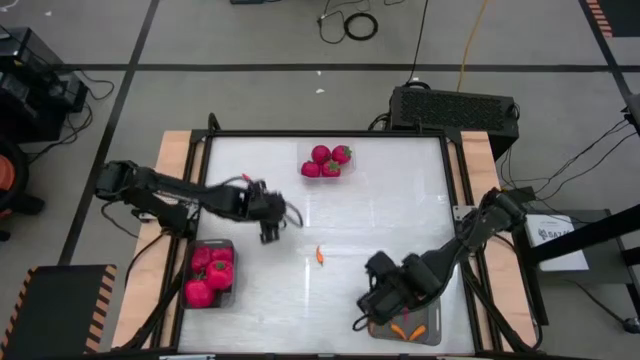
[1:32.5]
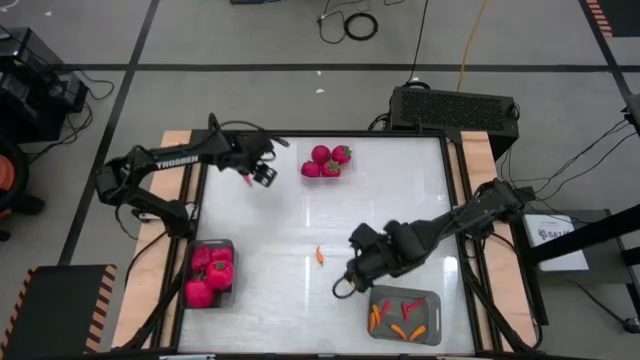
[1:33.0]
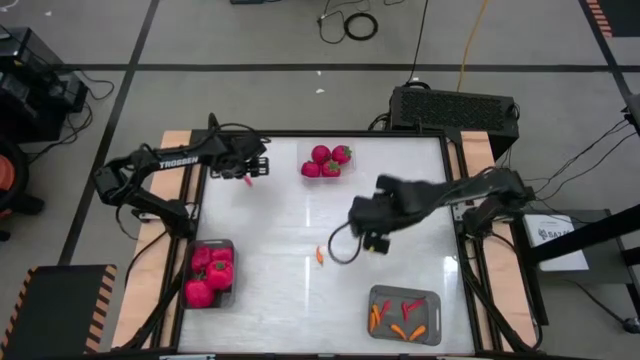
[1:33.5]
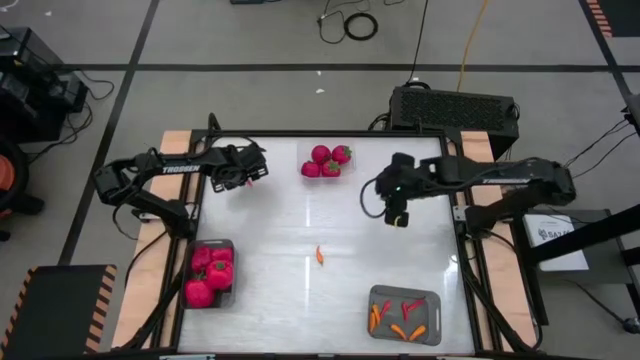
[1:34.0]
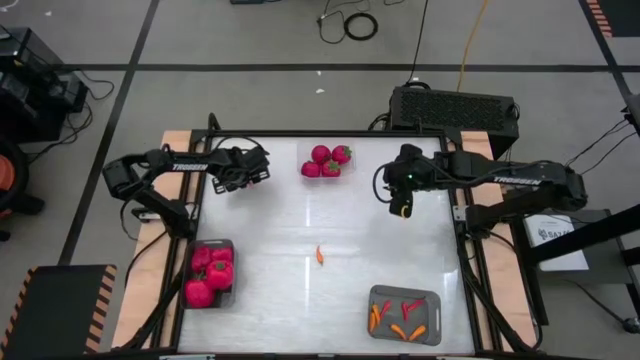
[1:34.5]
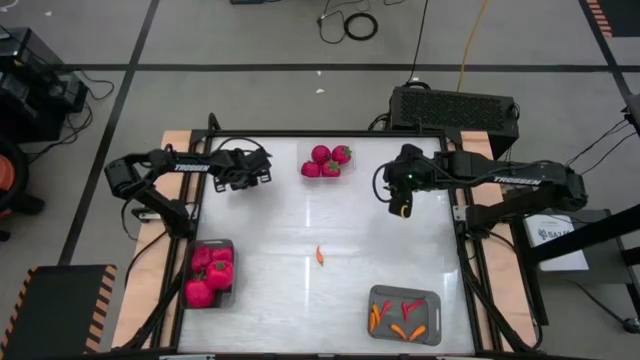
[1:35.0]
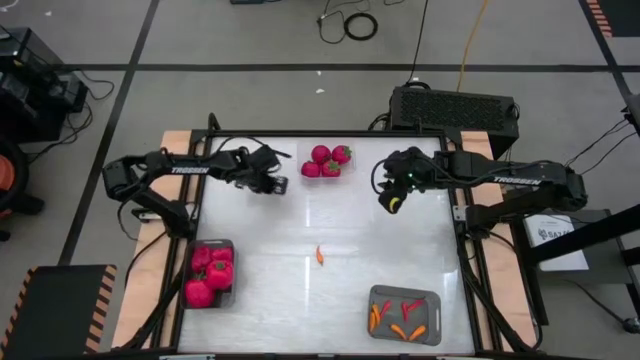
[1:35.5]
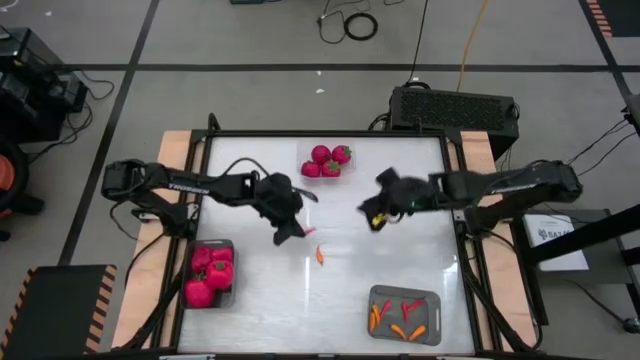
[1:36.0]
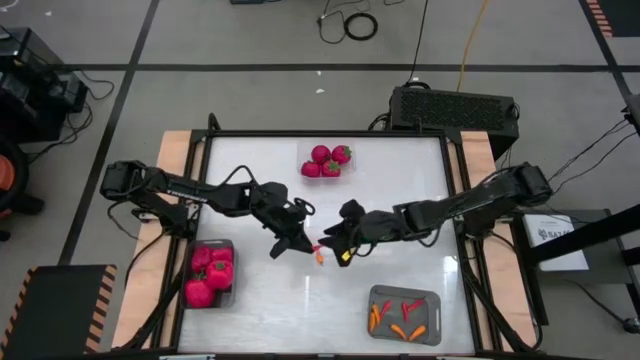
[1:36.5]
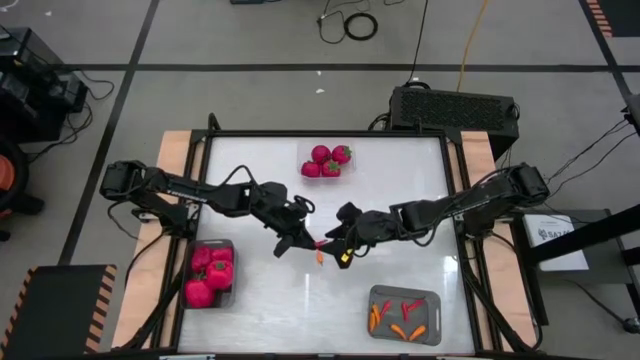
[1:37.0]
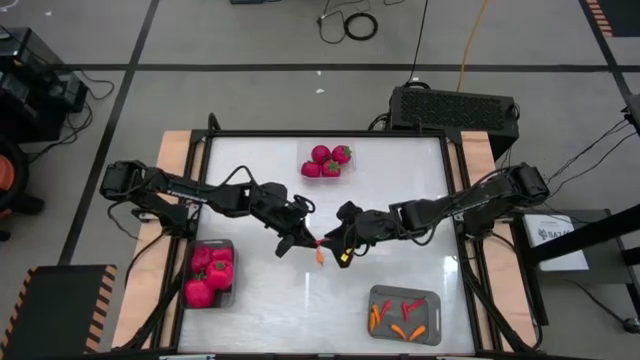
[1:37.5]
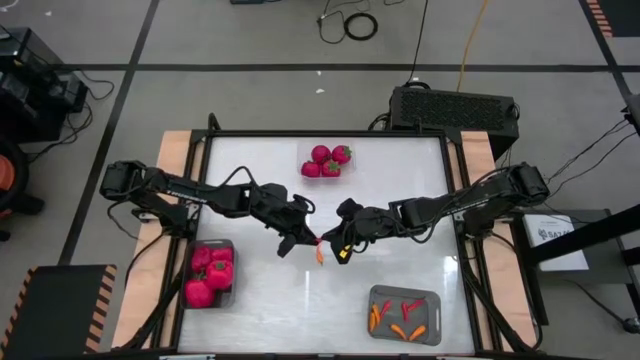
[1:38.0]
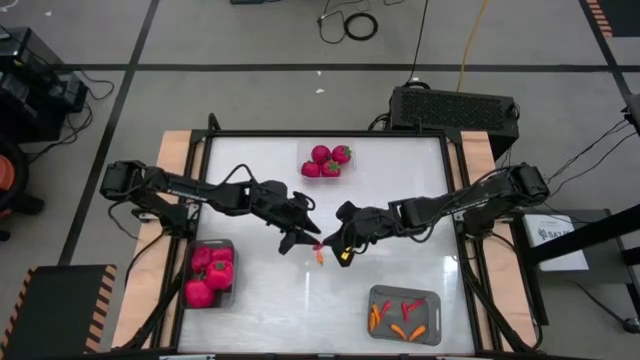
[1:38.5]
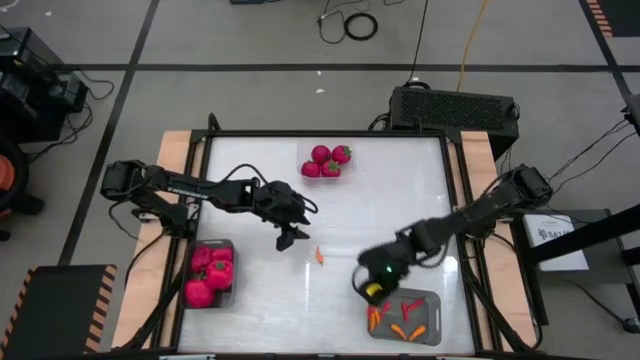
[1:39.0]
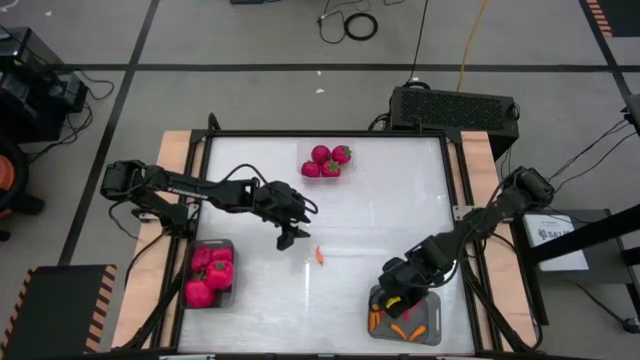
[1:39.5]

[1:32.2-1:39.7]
Task: Sort produce into baskets
Put the red chili pepper into the right black bin

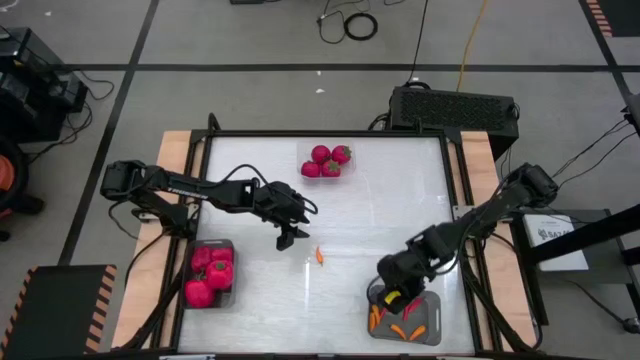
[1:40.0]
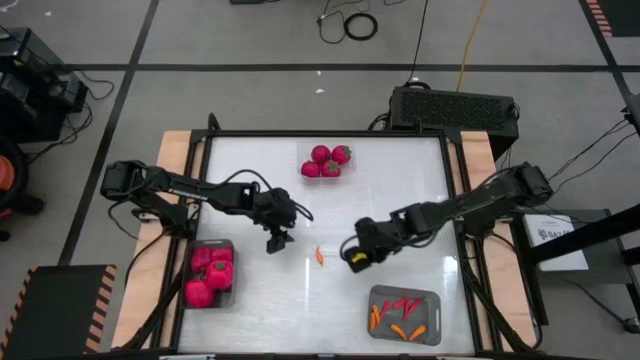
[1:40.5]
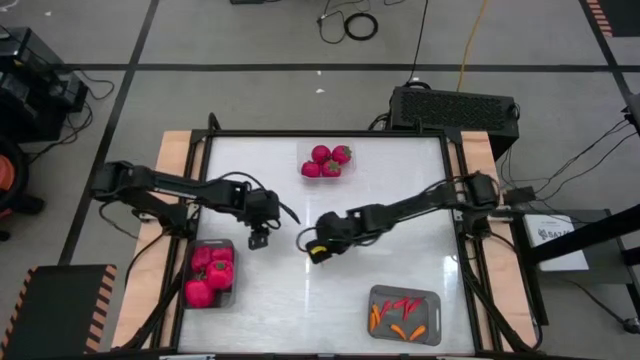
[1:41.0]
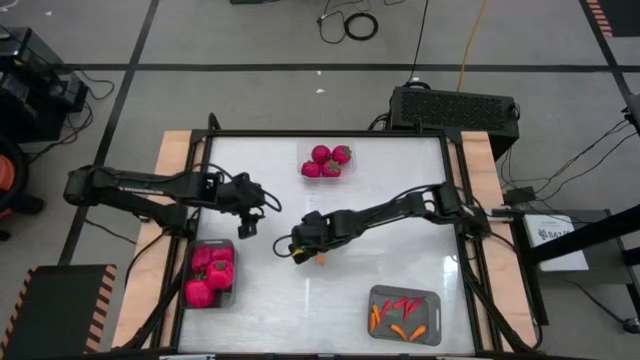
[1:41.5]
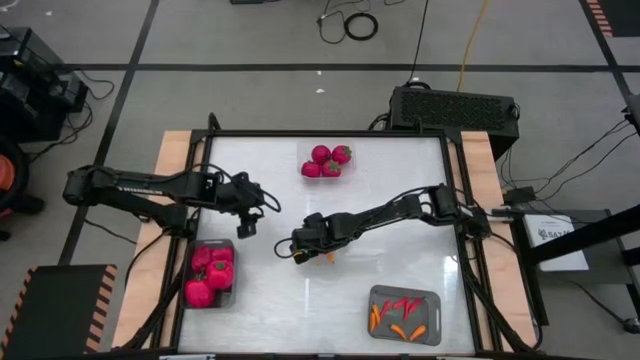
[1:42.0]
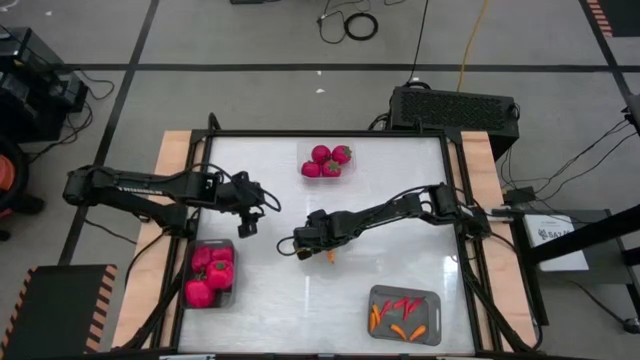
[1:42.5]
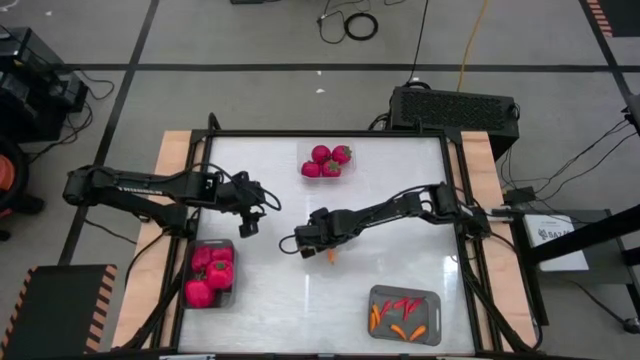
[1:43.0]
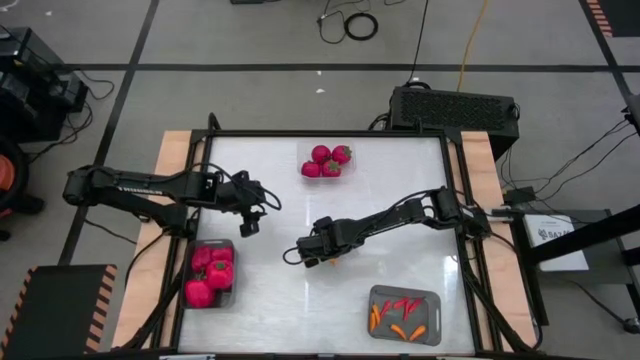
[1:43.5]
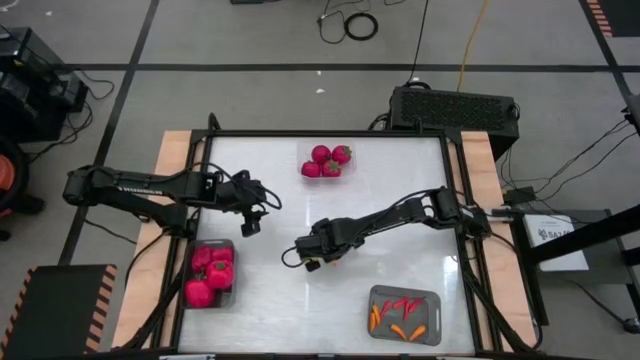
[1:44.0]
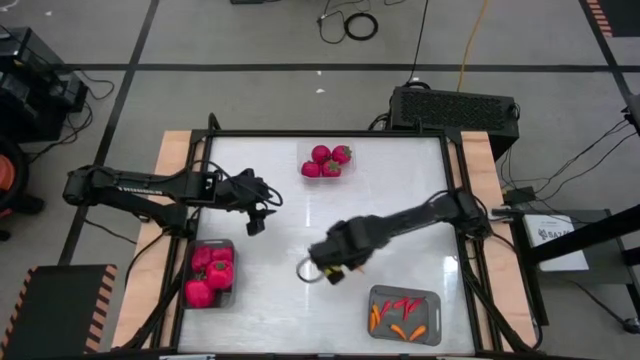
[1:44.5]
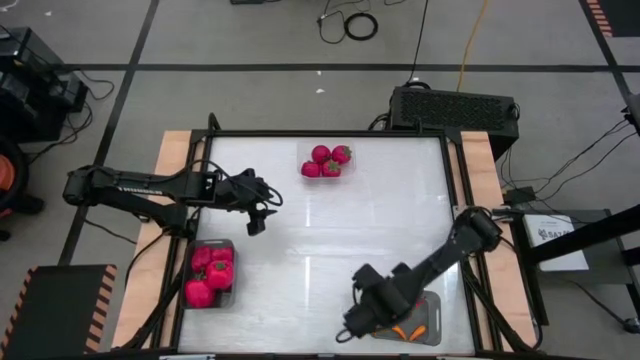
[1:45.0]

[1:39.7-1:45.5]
Put the orange chili pepper into the right black bin

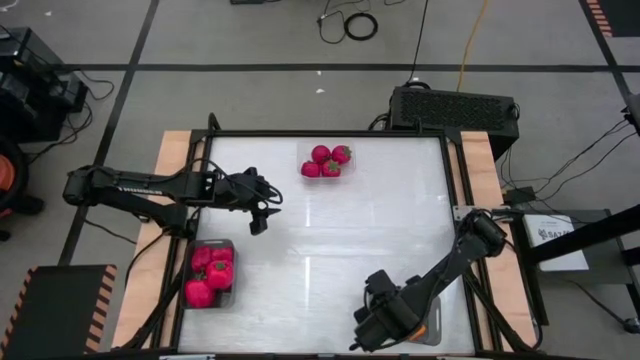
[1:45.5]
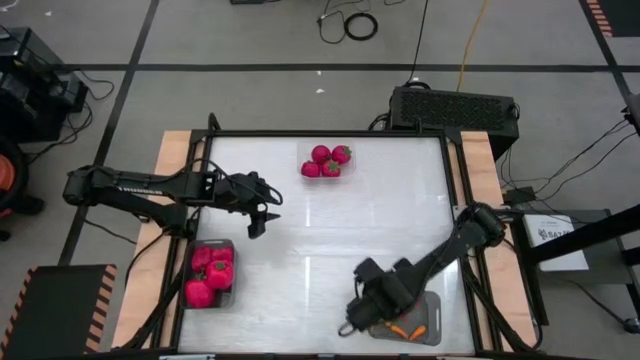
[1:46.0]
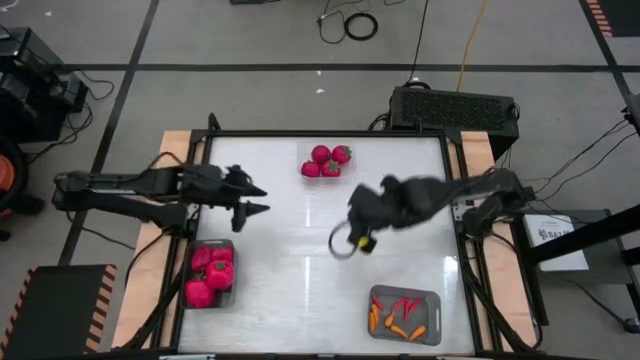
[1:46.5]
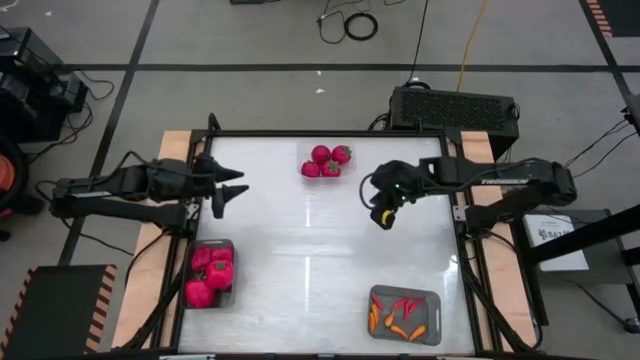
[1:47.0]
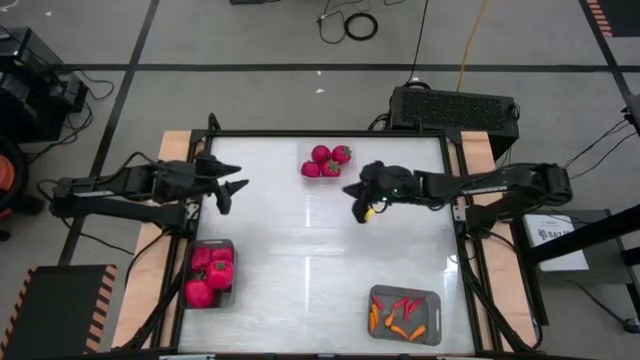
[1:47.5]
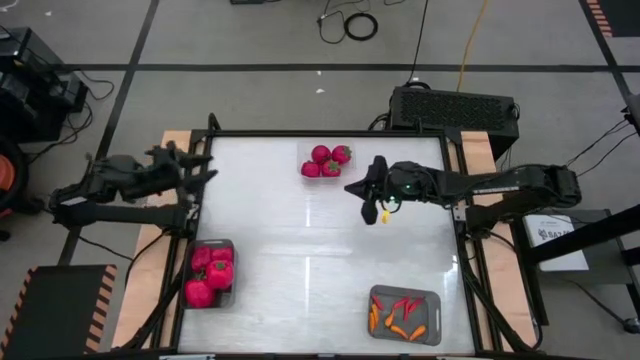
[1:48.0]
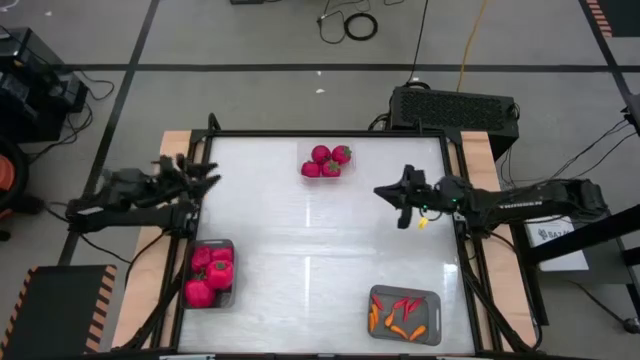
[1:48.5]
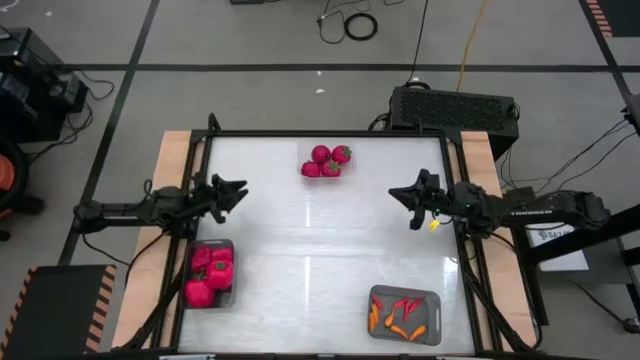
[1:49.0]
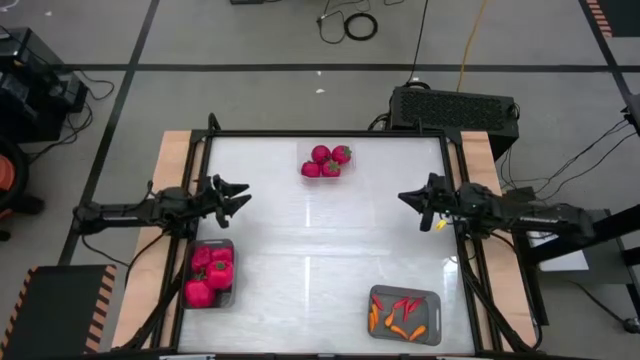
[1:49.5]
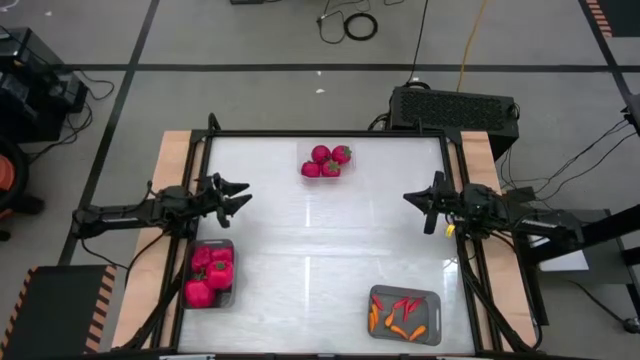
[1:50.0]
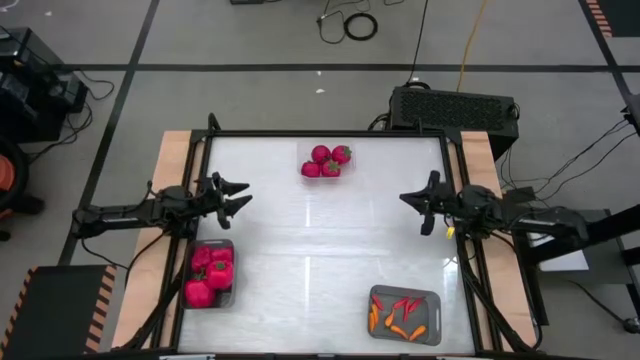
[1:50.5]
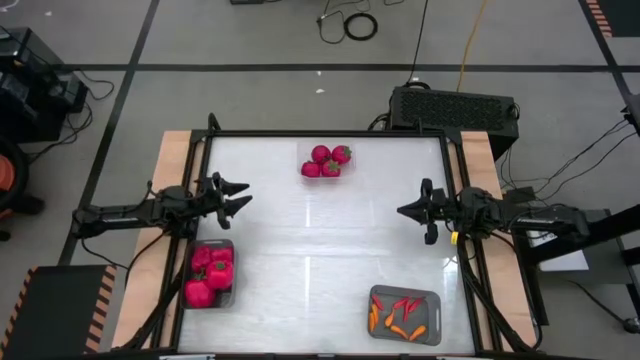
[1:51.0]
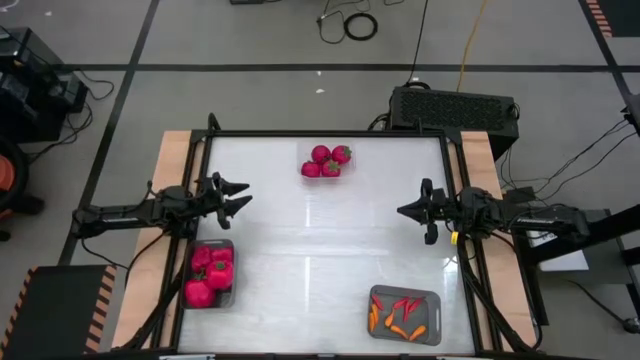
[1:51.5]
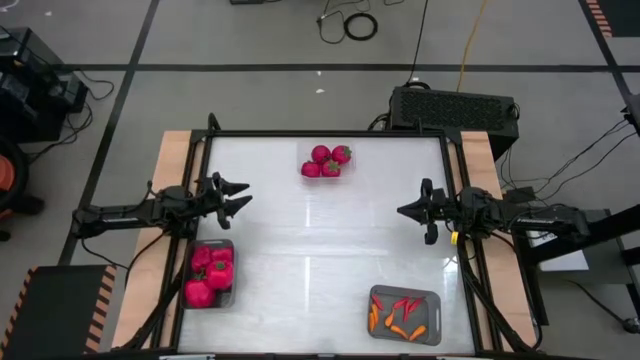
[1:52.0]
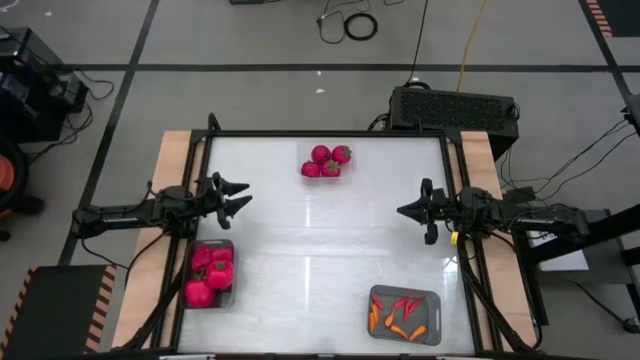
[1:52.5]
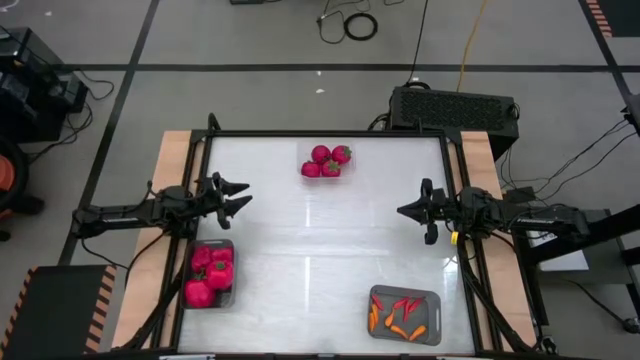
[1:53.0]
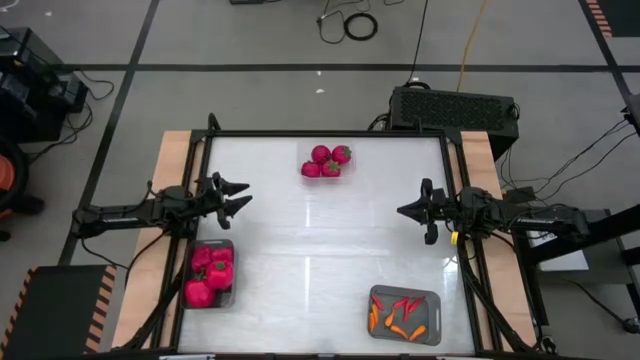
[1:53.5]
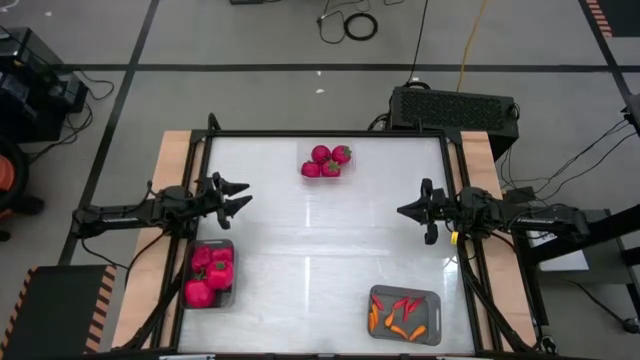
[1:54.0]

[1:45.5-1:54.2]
Return to Home Position
